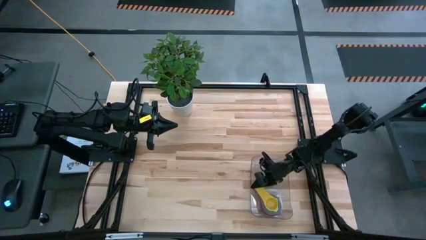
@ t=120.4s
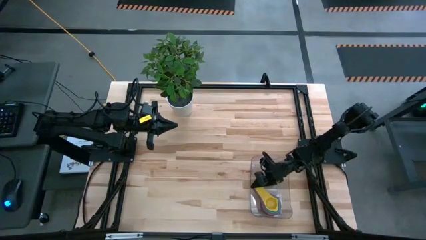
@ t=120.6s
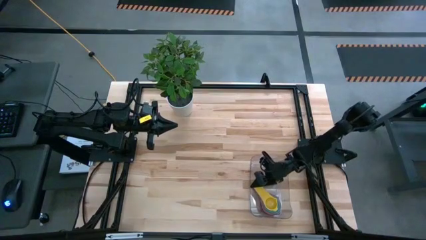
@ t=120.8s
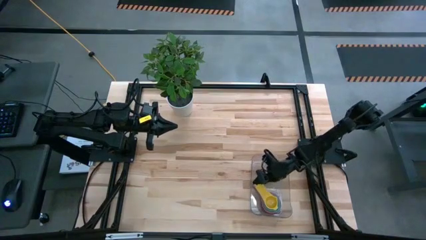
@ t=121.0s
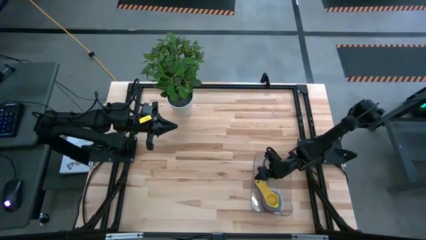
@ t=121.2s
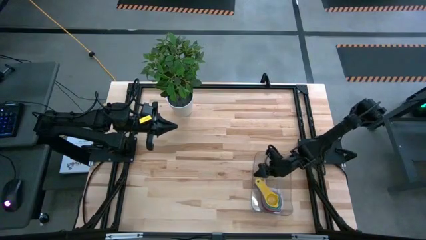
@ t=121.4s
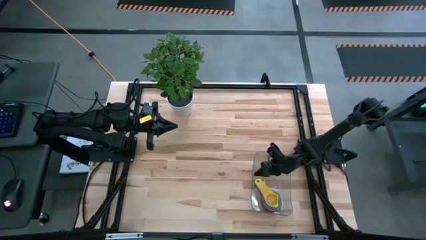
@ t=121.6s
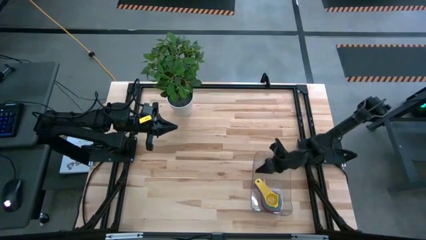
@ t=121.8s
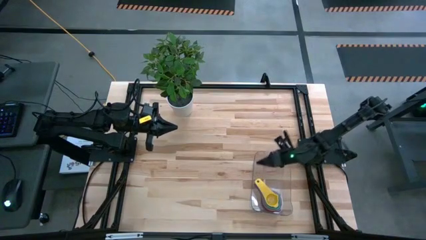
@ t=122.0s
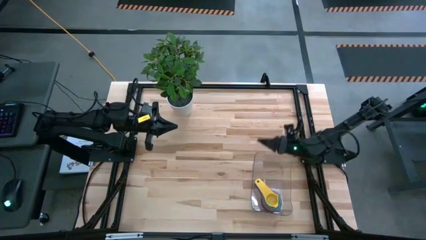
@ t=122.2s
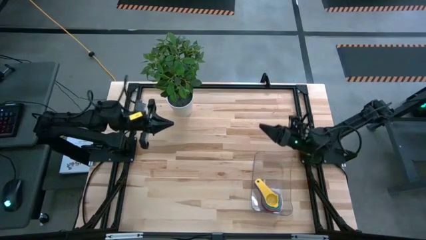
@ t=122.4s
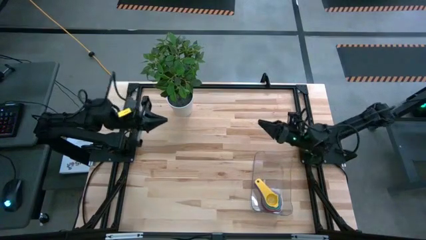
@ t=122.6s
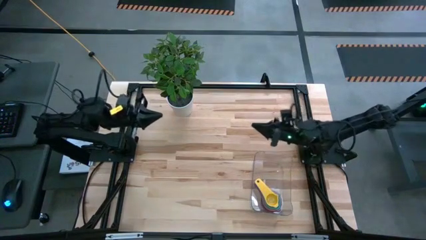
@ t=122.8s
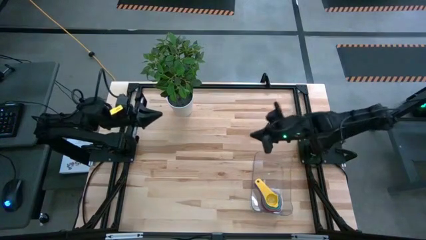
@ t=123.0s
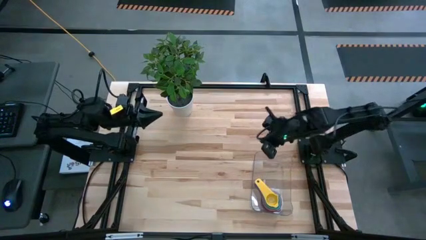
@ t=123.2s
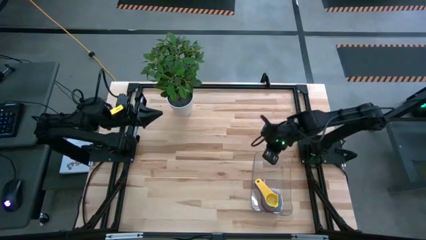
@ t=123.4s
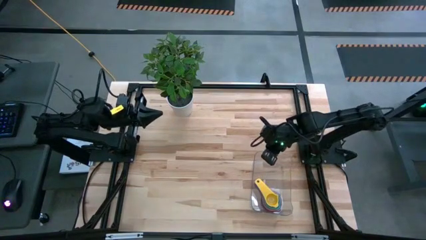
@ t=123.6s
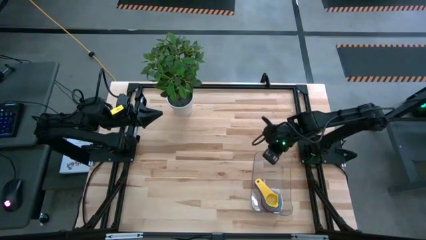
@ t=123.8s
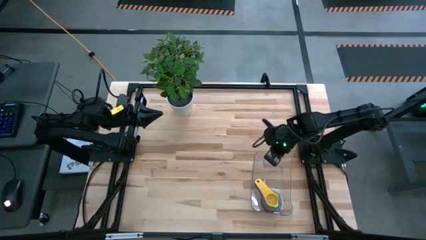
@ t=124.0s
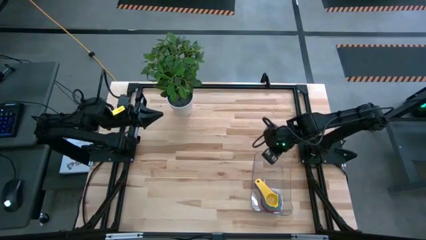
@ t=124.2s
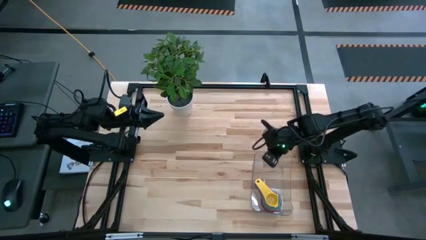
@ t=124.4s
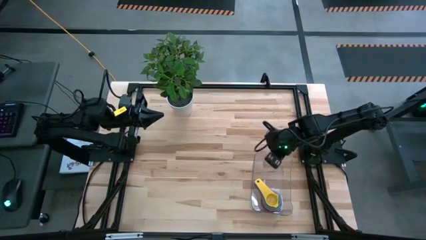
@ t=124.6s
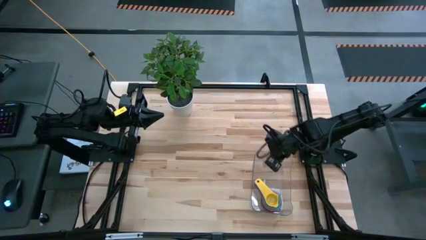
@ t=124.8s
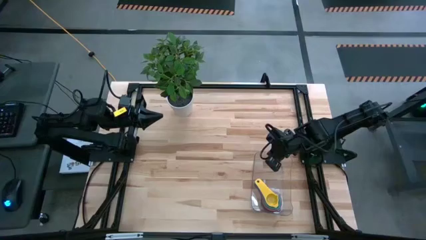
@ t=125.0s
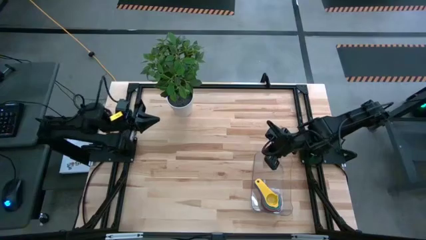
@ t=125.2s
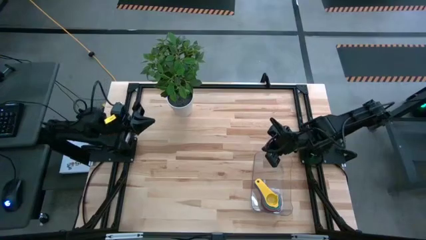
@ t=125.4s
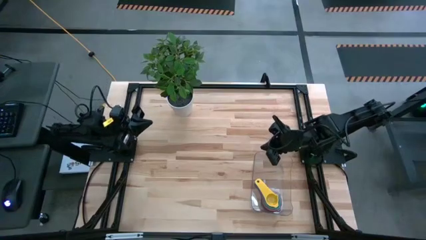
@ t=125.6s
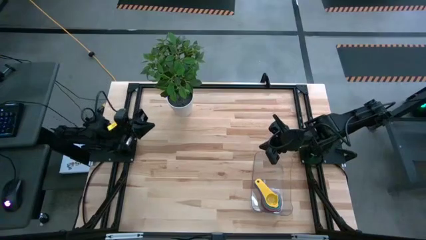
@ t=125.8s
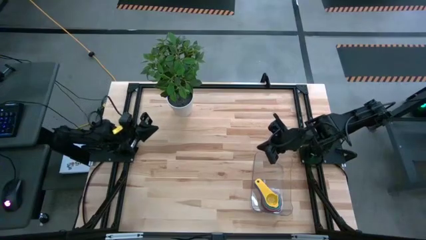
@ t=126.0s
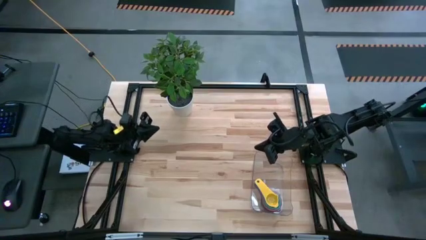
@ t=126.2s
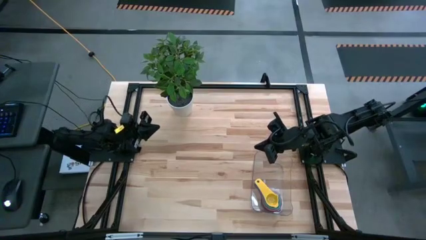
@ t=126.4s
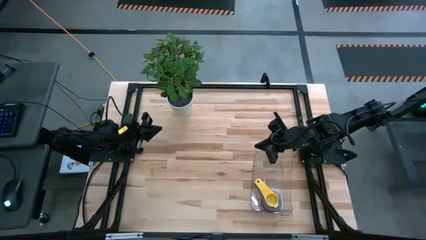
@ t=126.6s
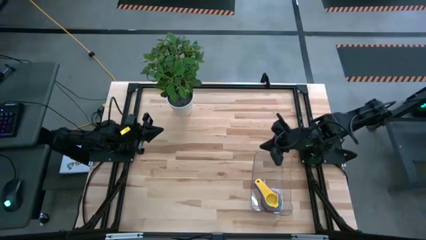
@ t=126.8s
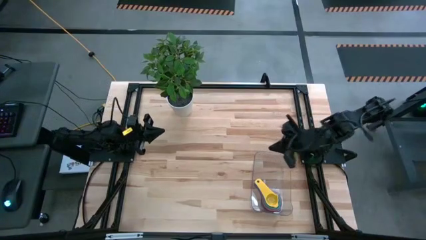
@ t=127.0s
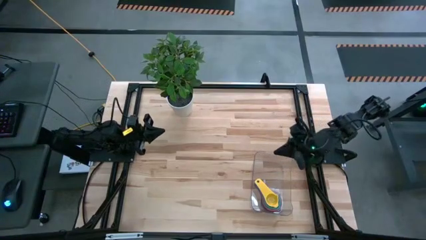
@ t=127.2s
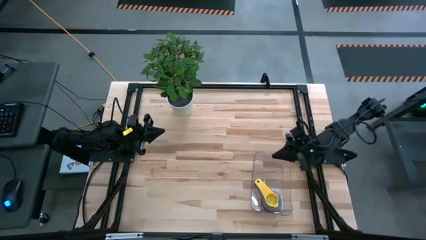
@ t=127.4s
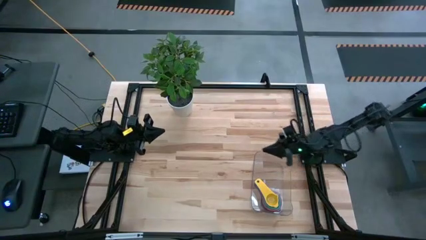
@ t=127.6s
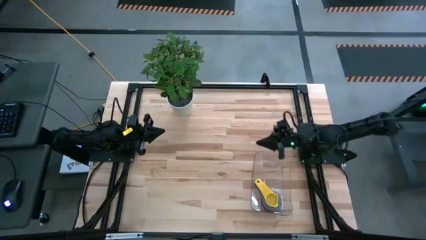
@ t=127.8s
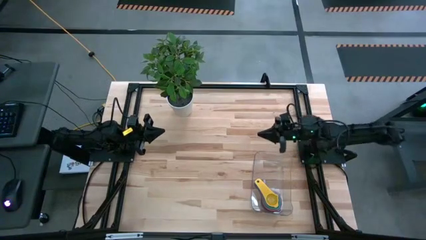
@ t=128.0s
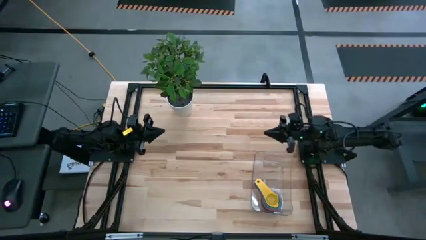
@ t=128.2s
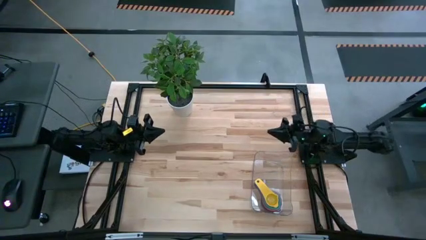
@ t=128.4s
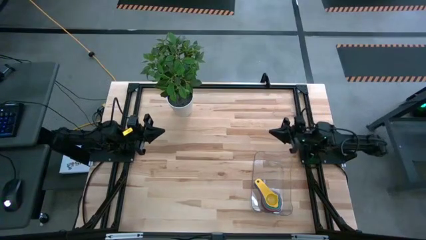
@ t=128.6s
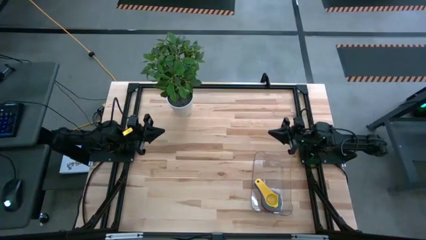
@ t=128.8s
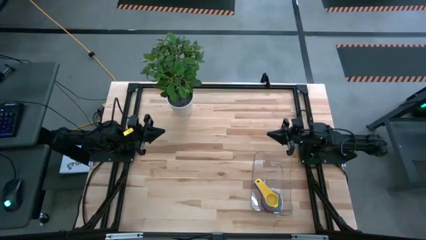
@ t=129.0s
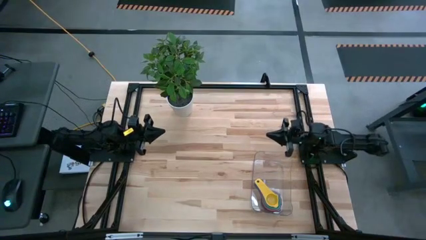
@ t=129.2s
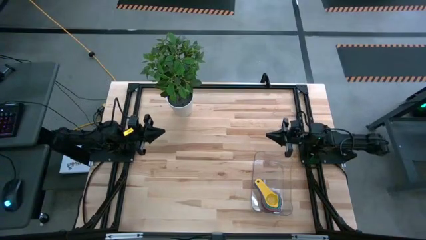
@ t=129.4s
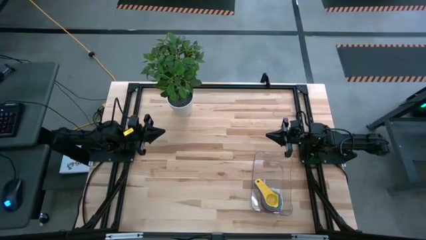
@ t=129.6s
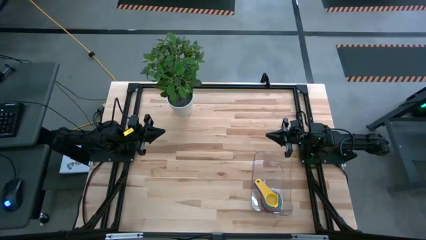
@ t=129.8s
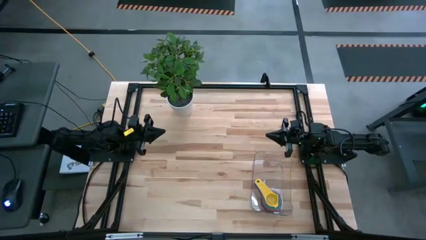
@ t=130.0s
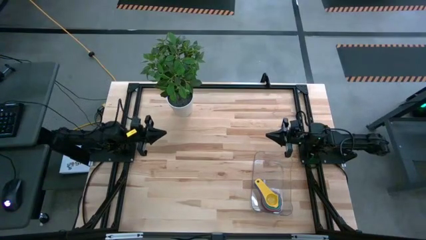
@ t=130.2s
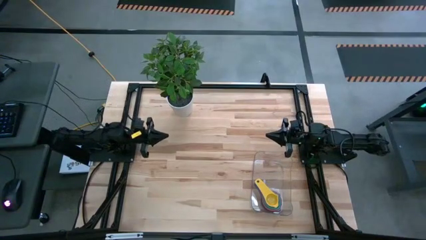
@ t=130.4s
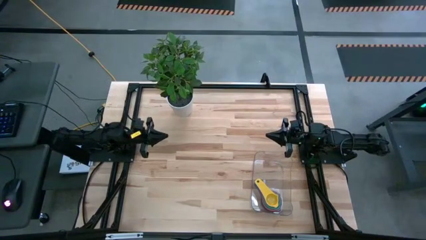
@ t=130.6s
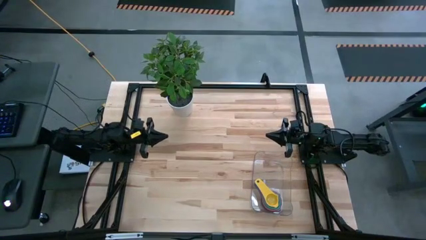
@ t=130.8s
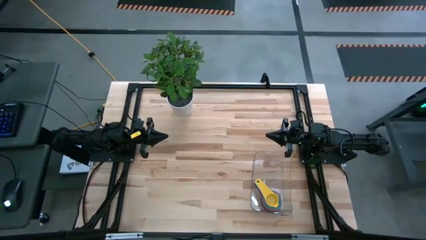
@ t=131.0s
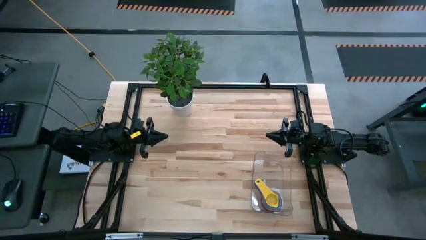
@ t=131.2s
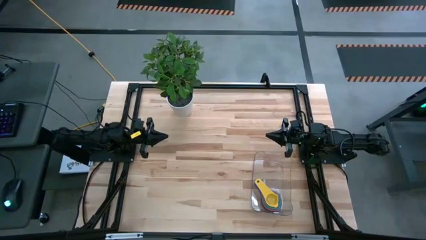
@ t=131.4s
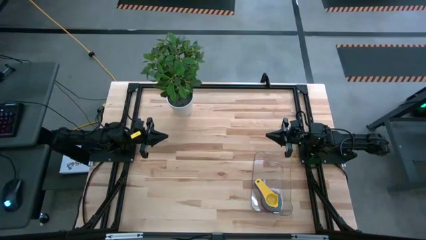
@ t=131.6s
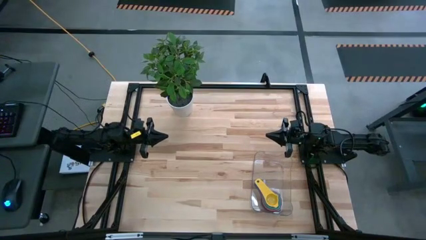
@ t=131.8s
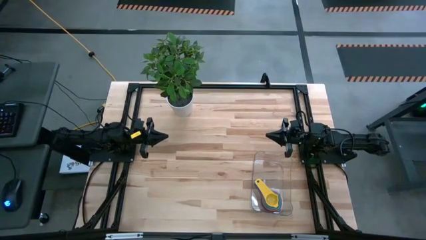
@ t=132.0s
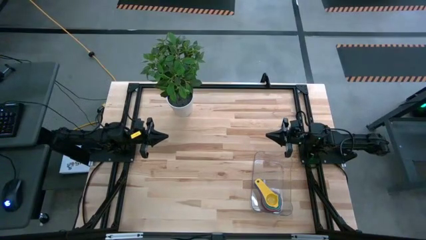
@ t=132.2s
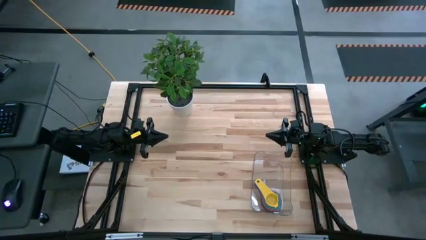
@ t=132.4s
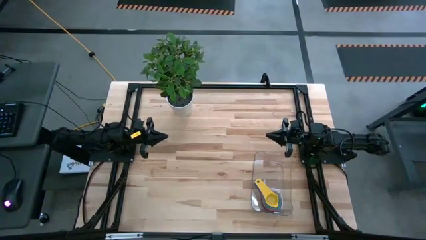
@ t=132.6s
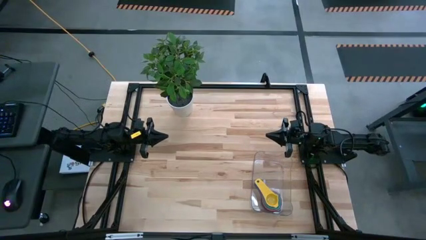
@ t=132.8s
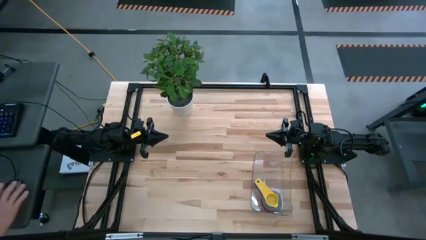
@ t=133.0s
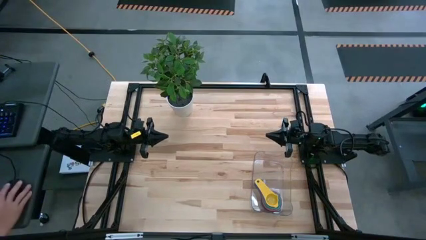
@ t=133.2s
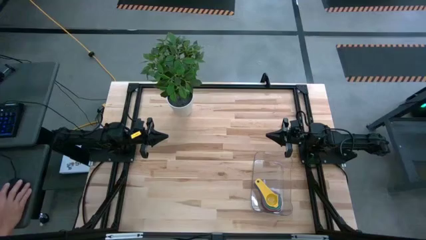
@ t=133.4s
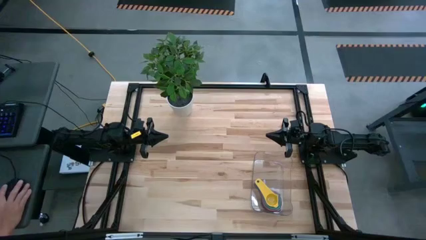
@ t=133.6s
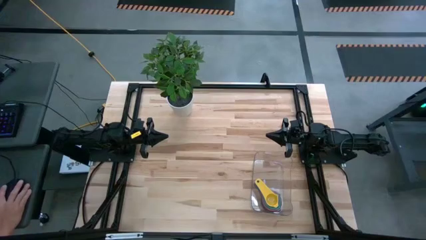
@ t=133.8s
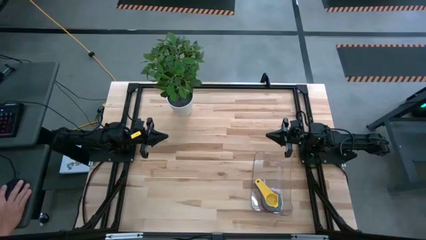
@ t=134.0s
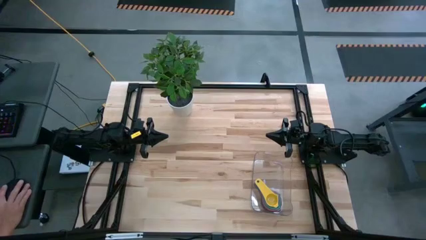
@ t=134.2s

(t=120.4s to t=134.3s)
Task: Nest measuring cups in basket
Return to Home Position
